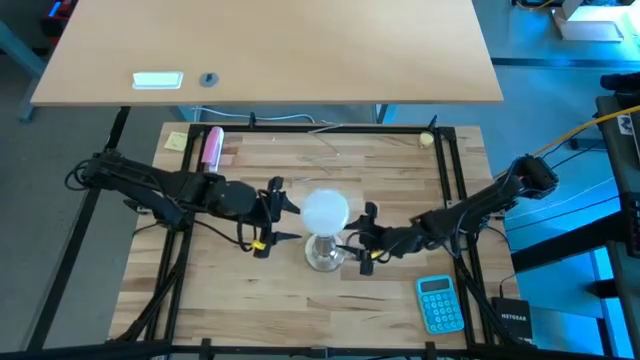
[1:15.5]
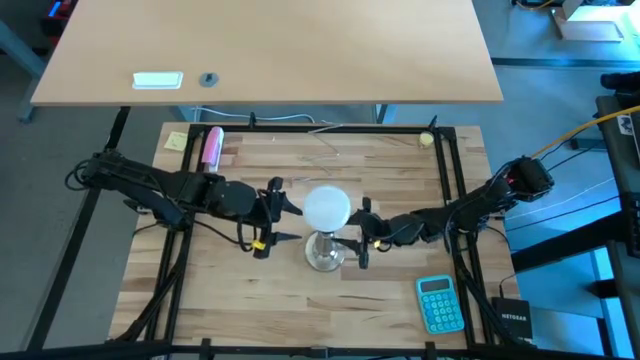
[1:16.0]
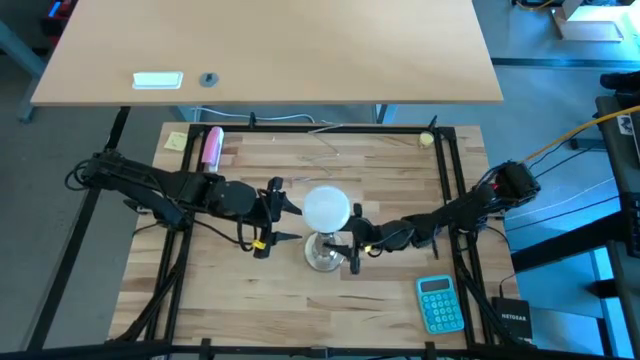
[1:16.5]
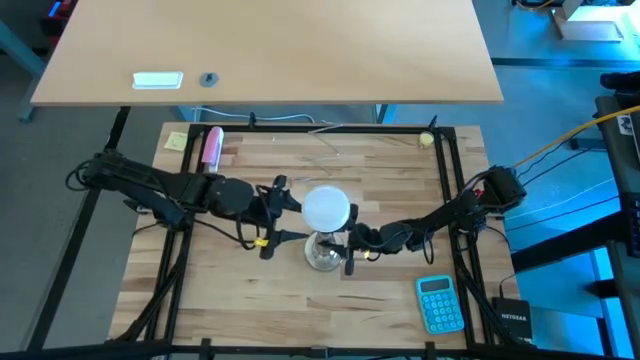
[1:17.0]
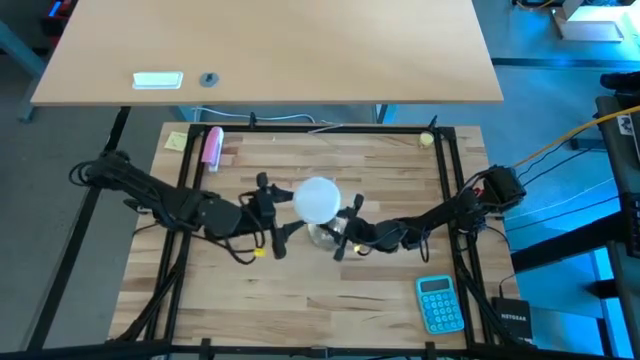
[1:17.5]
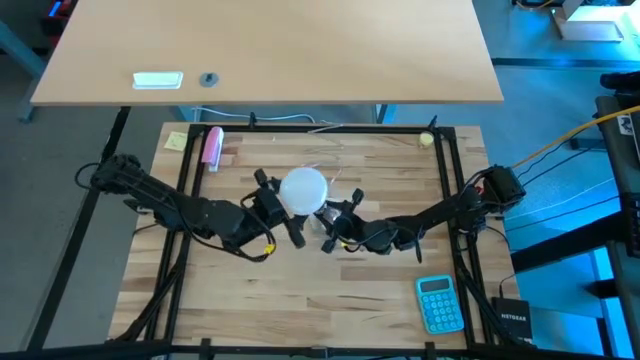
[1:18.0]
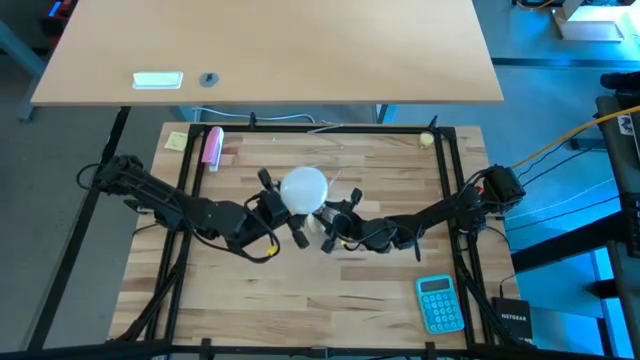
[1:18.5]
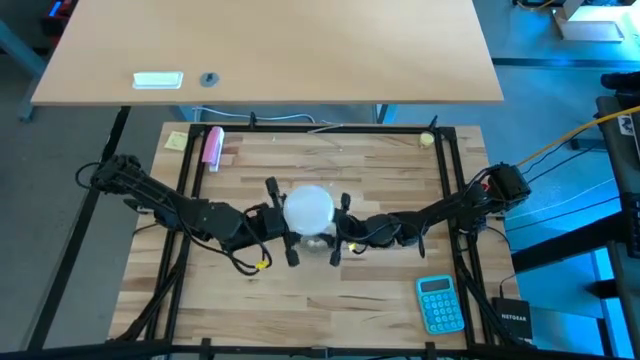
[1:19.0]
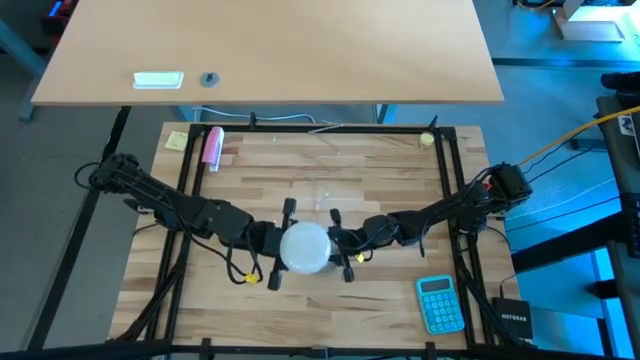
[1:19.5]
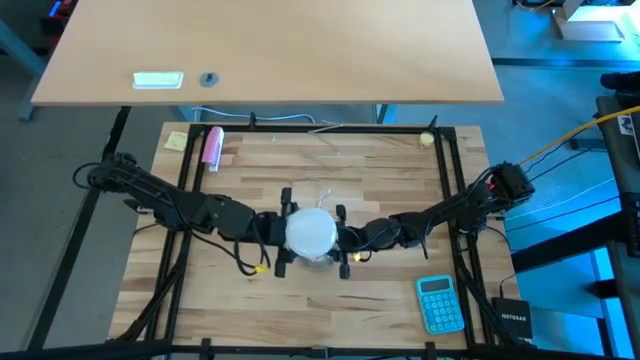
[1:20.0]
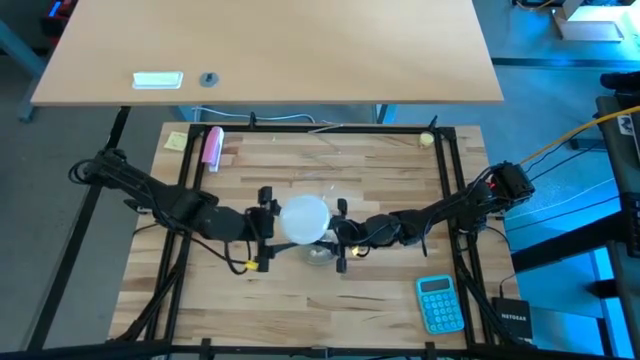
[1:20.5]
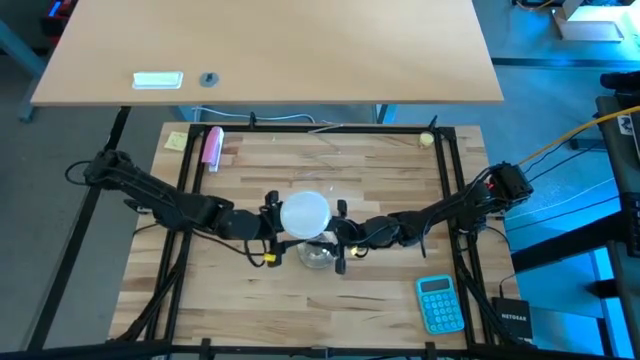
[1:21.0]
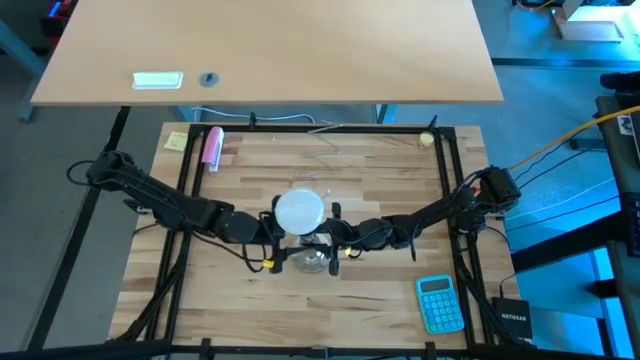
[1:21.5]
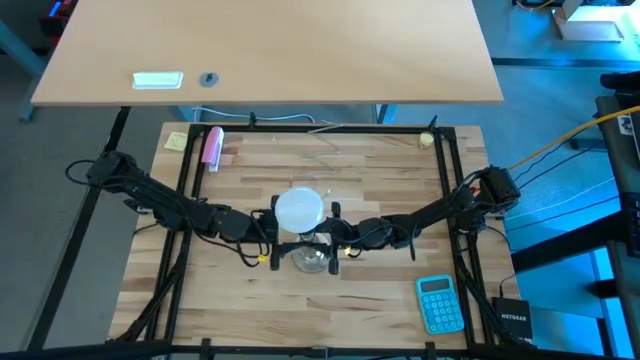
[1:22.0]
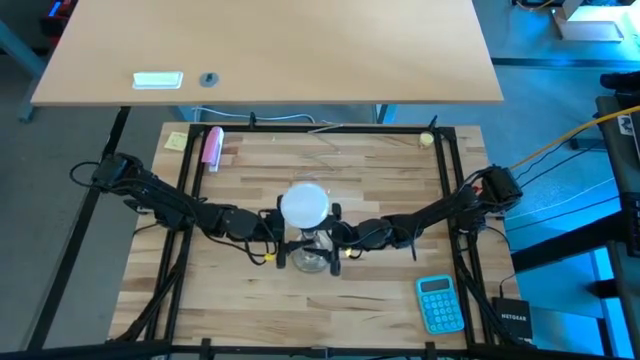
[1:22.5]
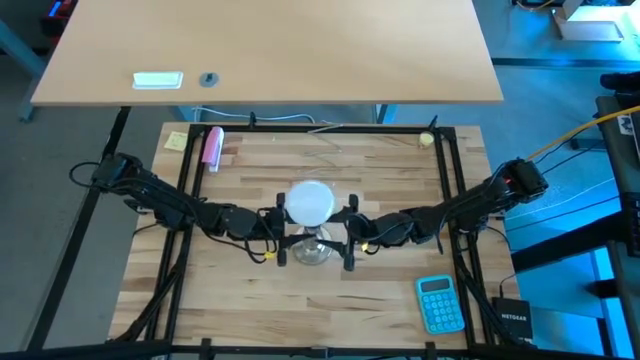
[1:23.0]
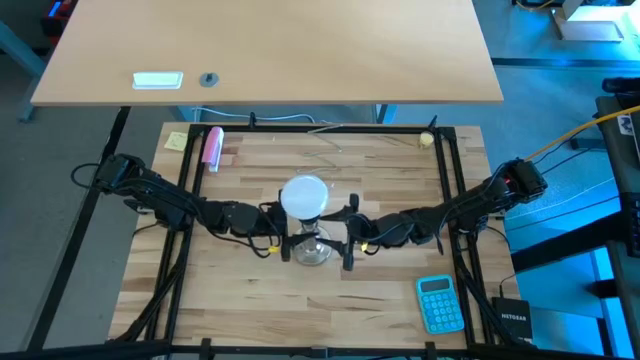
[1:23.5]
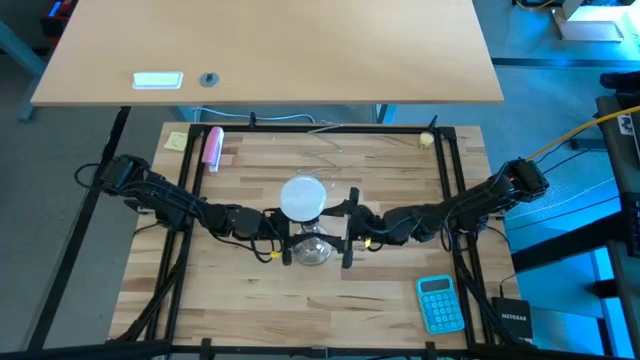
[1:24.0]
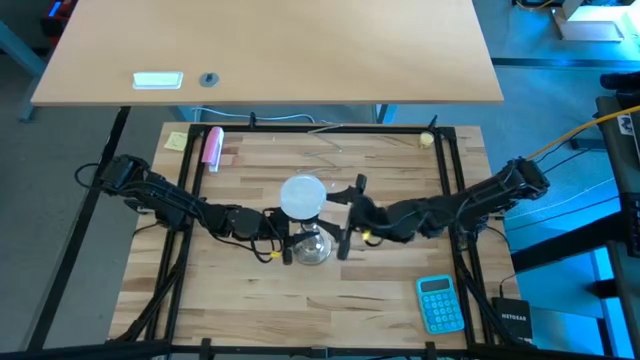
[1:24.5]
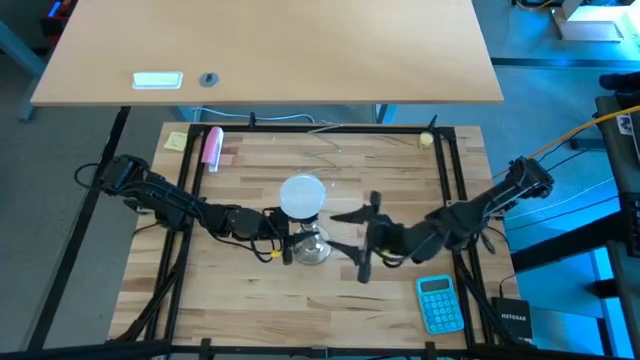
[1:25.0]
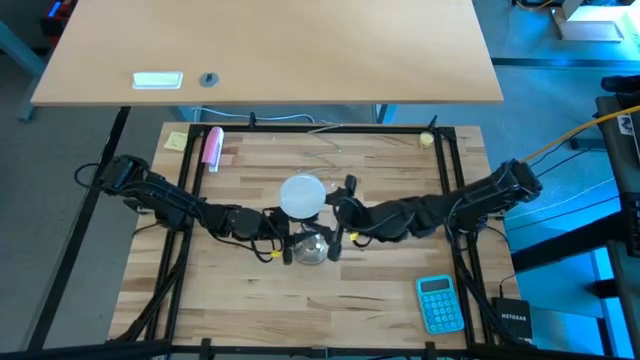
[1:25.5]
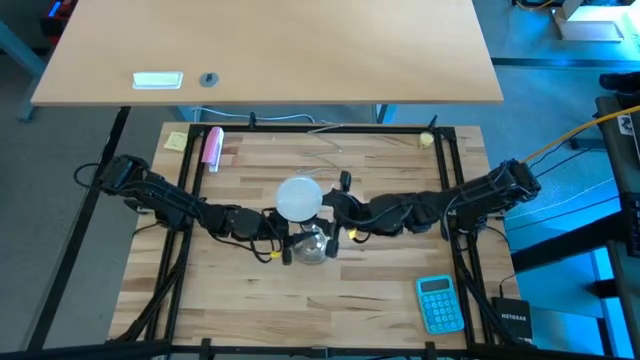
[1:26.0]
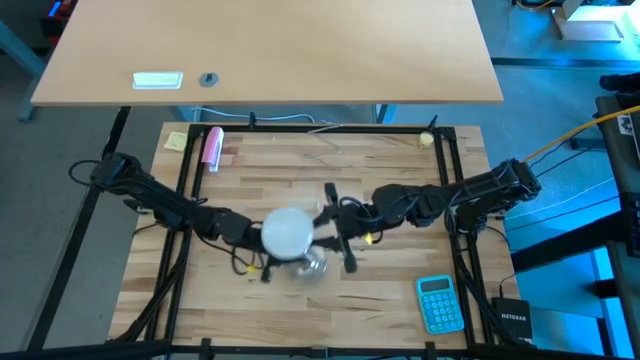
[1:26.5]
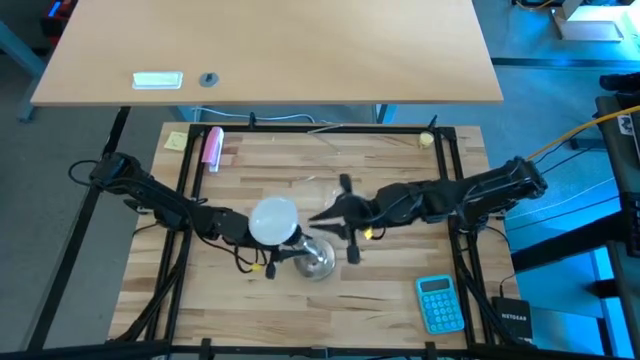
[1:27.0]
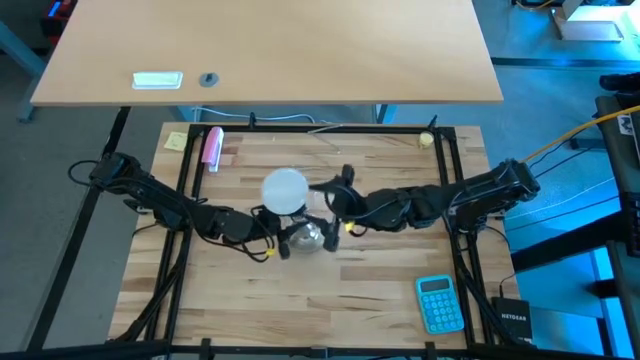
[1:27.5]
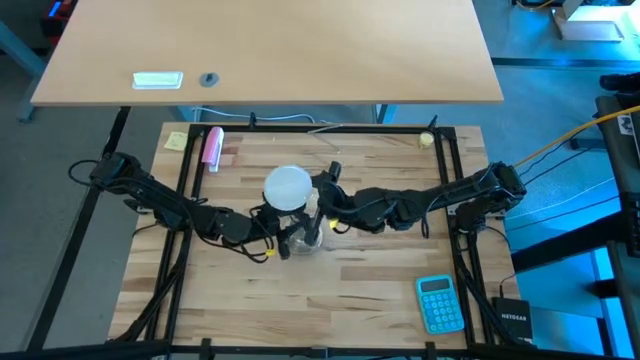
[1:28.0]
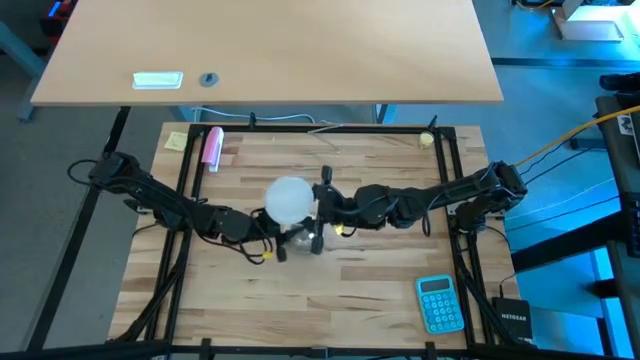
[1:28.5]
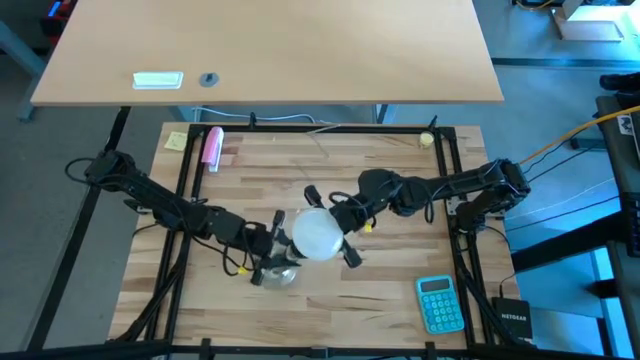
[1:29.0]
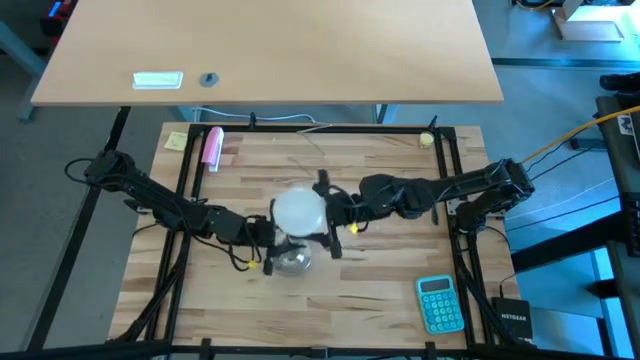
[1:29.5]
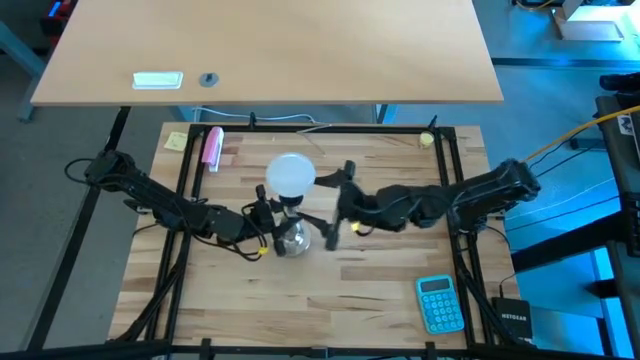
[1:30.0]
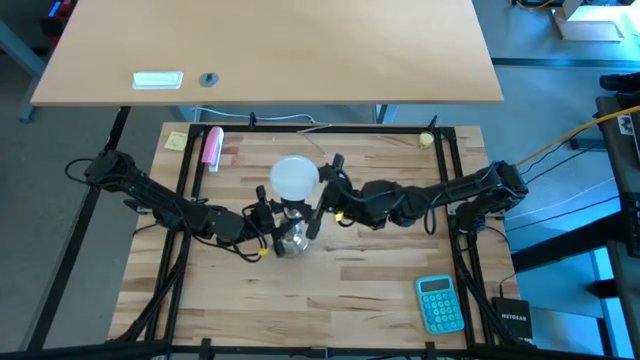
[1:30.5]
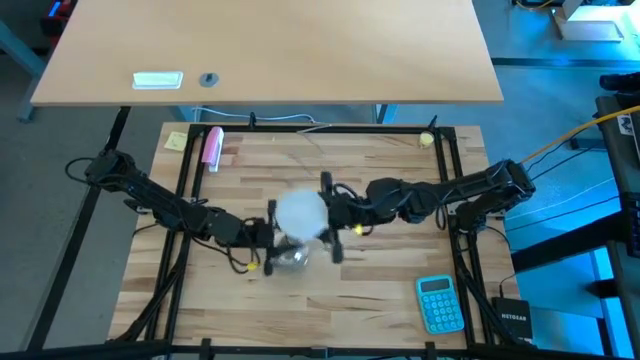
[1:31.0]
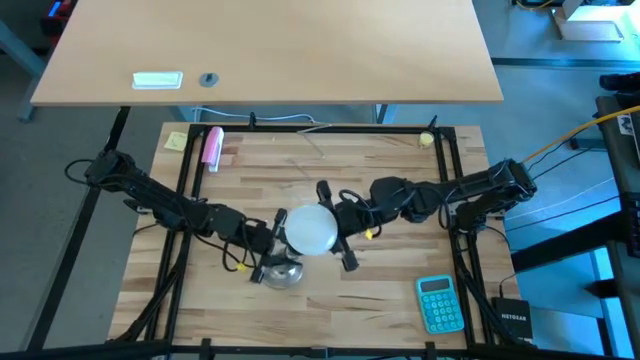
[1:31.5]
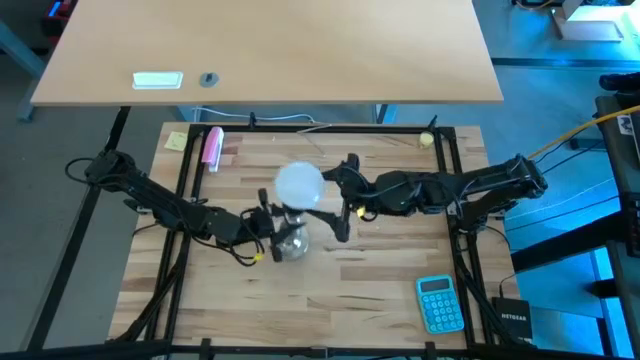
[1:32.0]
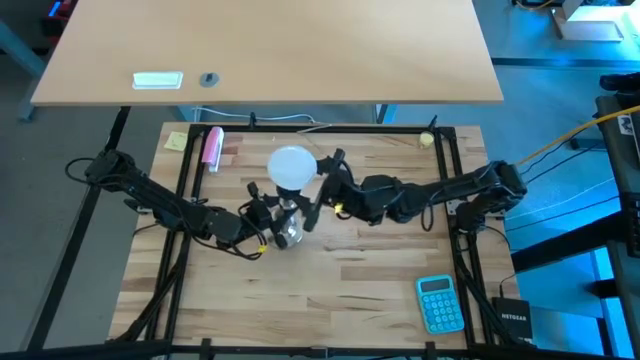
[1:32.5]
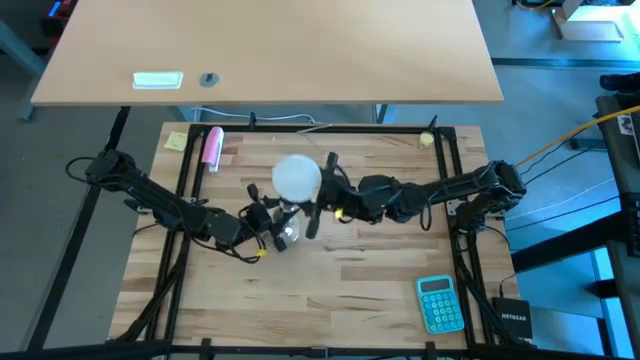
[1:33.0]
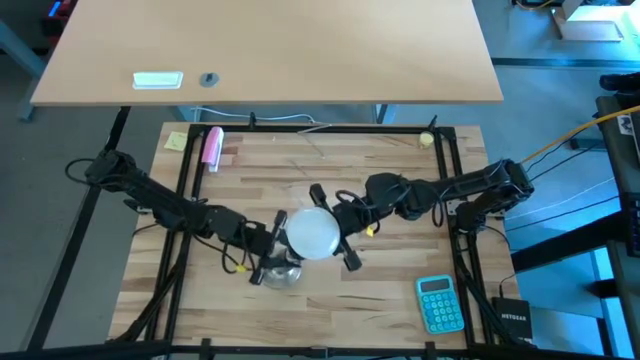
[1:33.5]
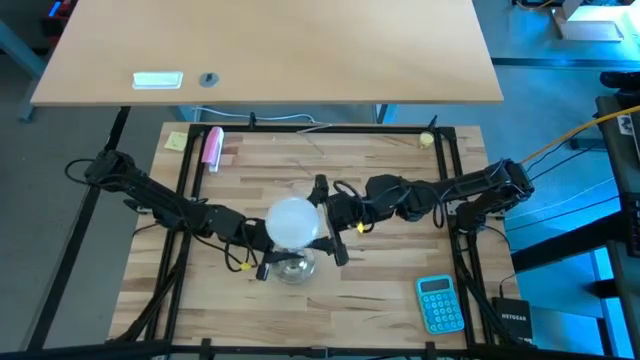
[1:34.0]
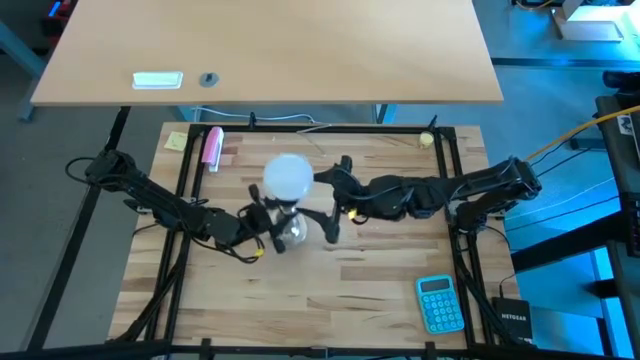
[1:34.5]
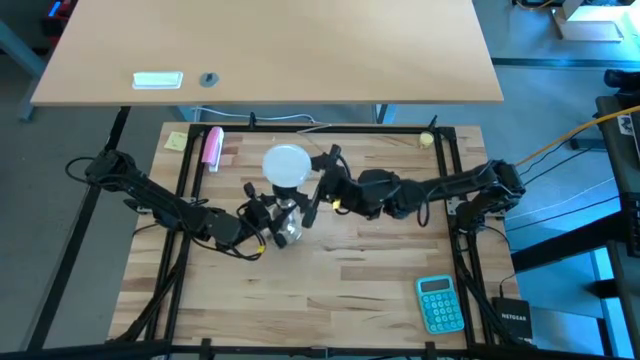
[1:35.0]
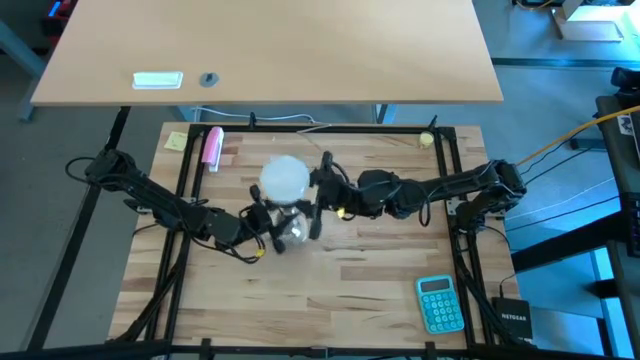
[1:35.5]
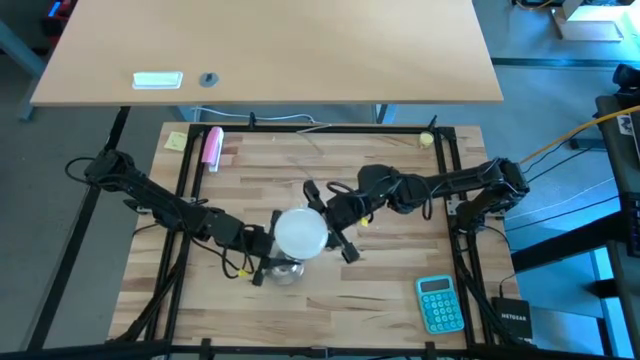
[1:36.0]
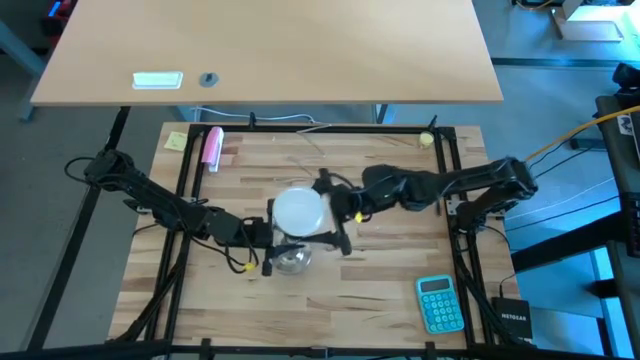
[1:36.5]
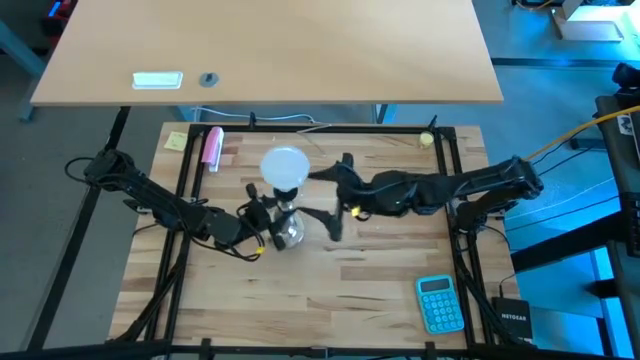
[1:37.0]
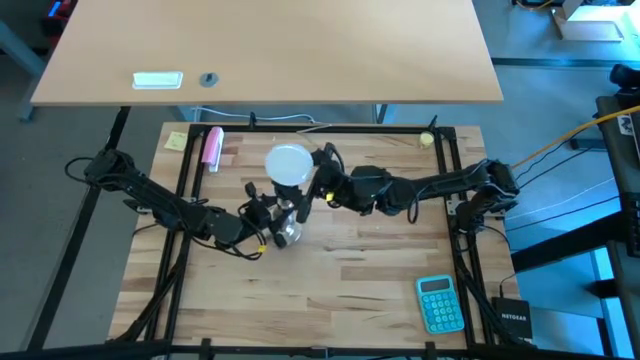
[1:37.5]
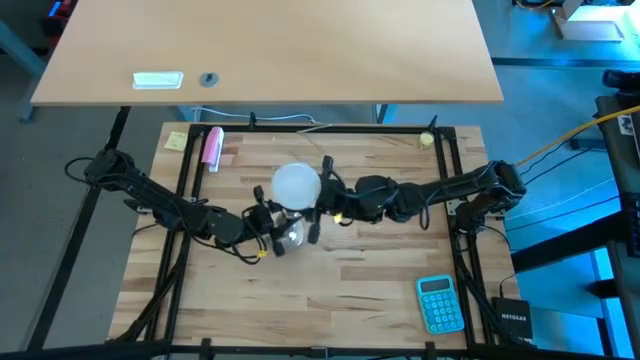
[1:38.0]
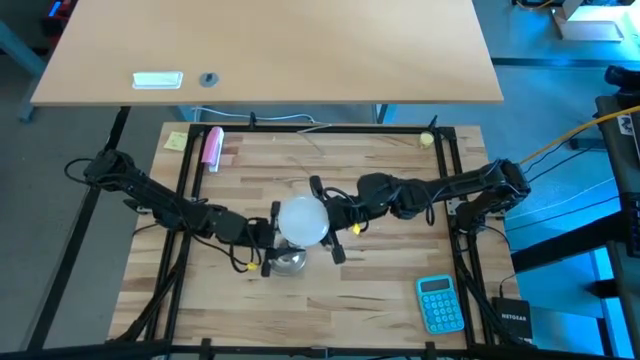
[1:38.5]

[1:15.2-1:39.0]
Task: Screw lightbulb
Remove the light bulb from the lamp
